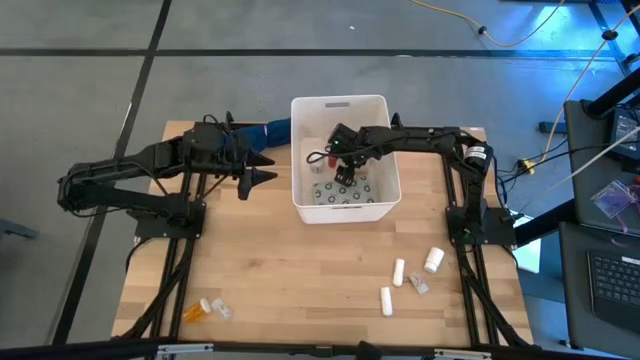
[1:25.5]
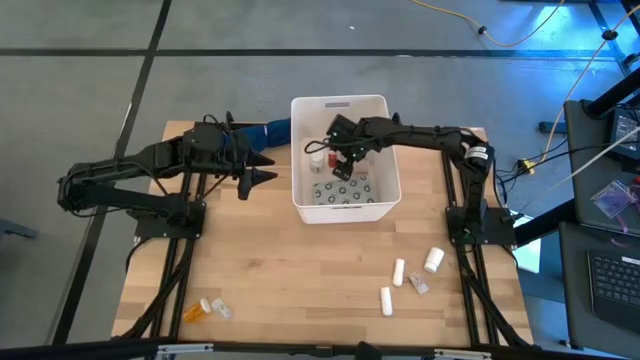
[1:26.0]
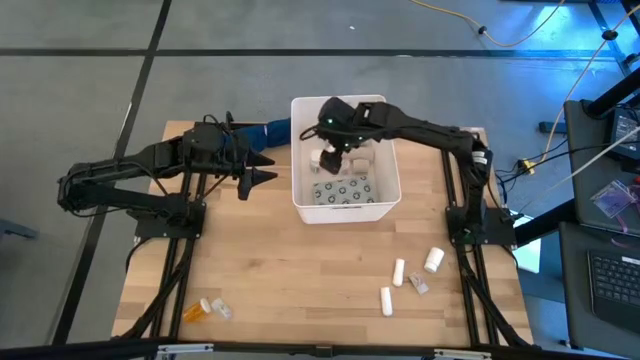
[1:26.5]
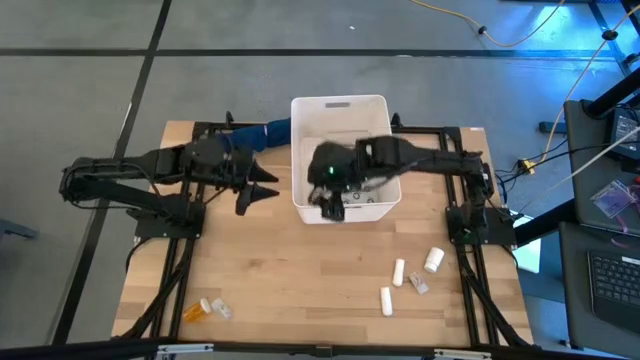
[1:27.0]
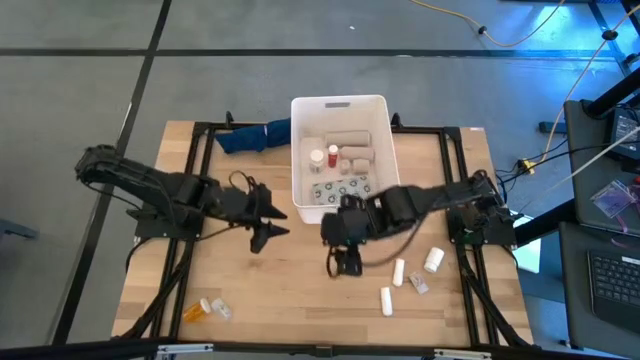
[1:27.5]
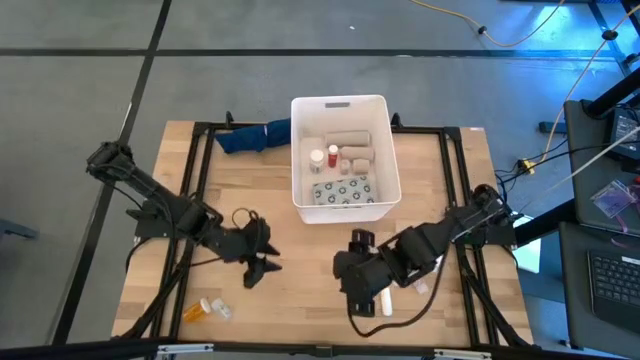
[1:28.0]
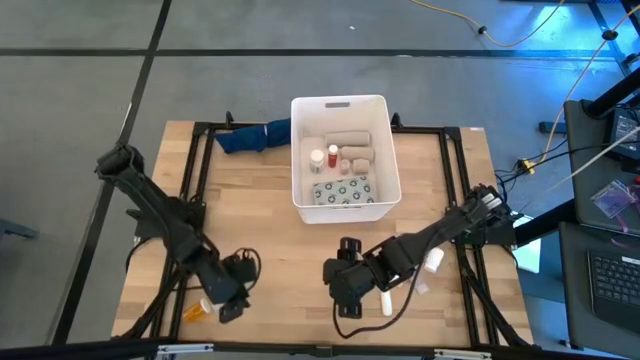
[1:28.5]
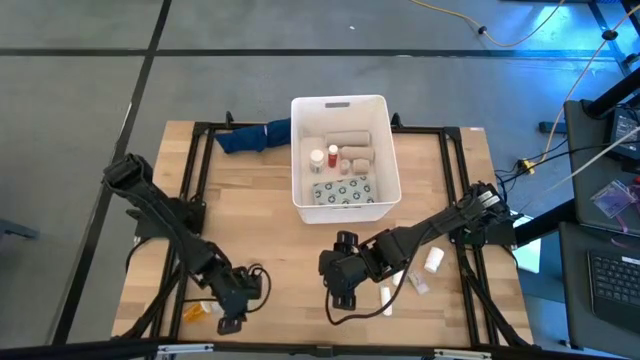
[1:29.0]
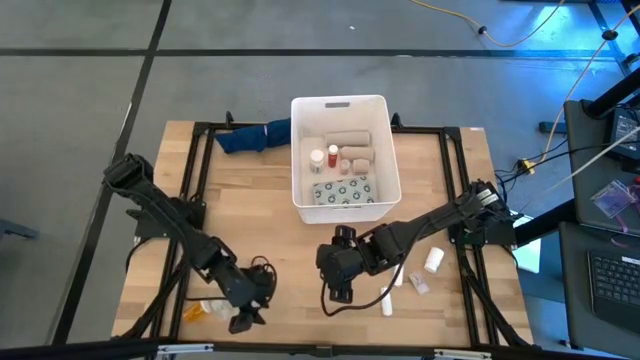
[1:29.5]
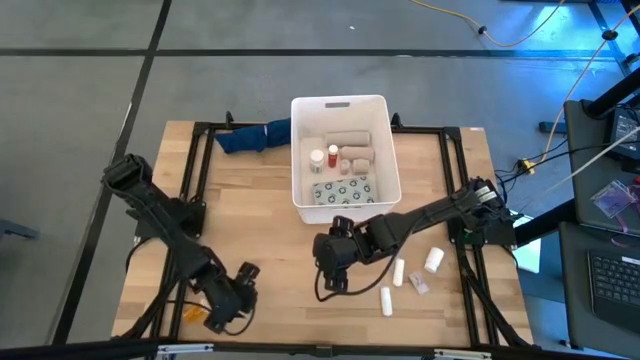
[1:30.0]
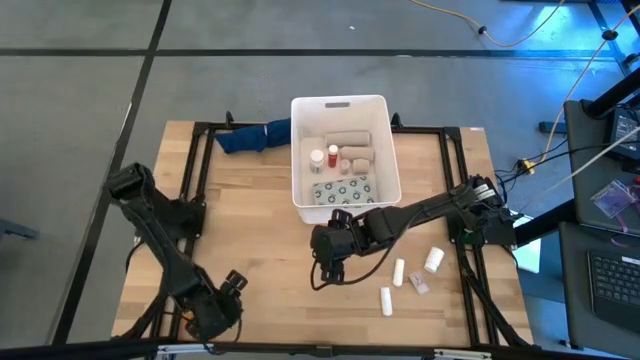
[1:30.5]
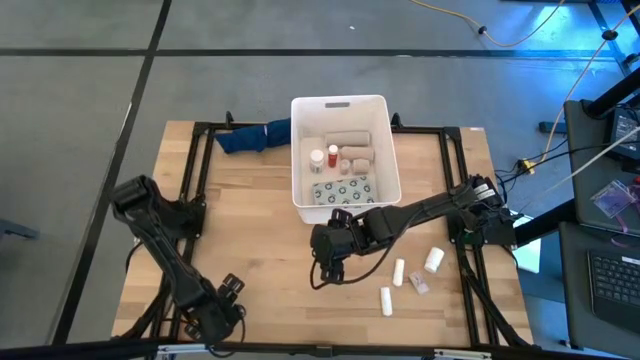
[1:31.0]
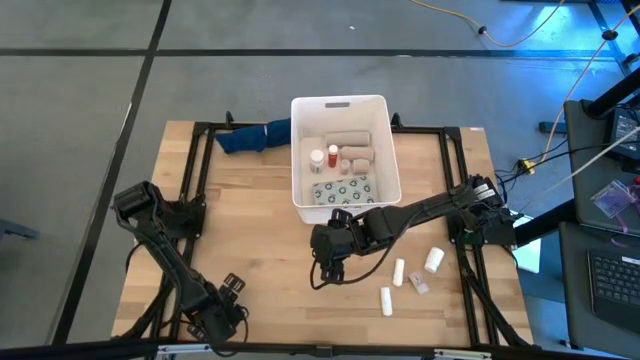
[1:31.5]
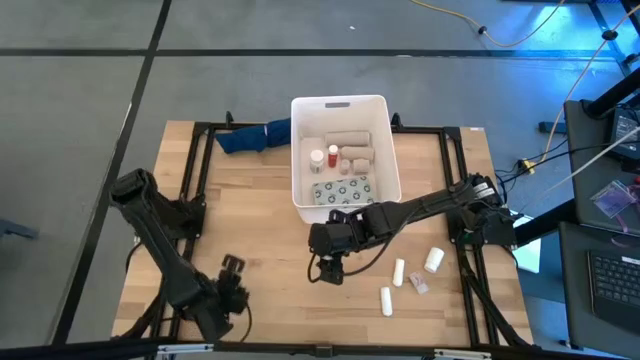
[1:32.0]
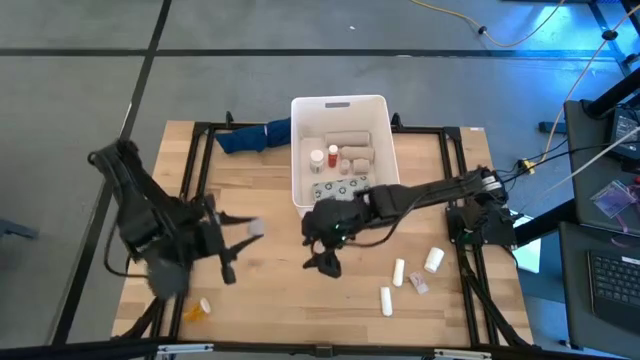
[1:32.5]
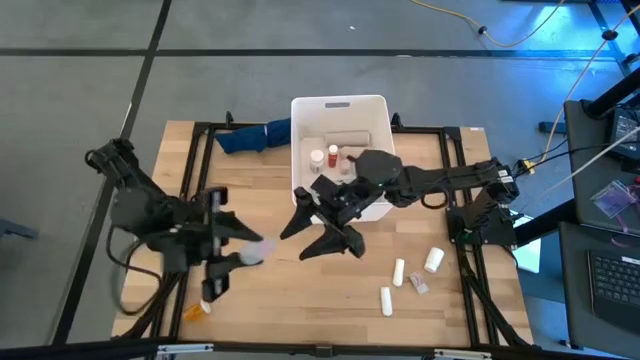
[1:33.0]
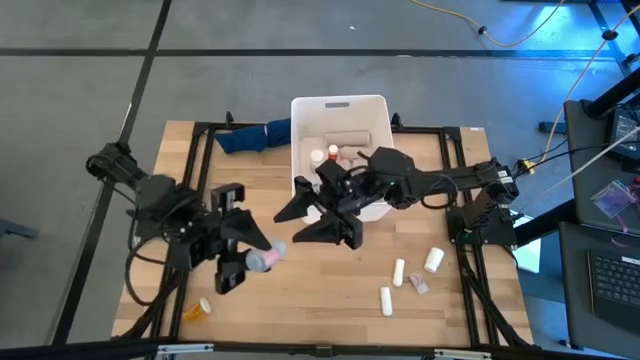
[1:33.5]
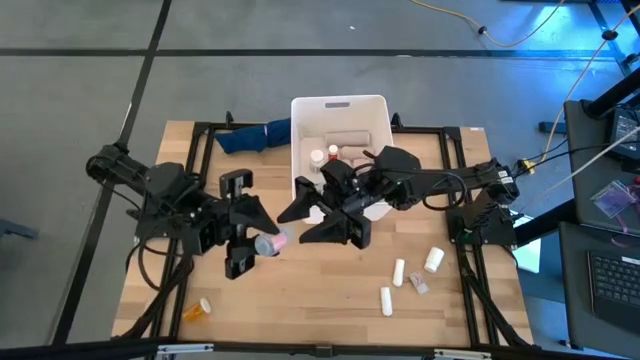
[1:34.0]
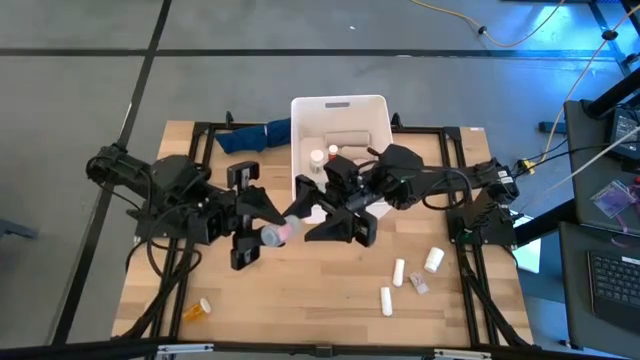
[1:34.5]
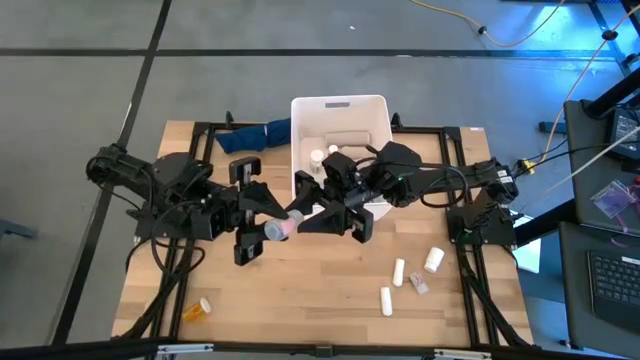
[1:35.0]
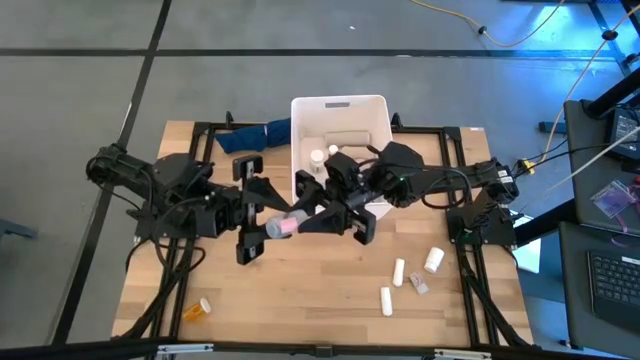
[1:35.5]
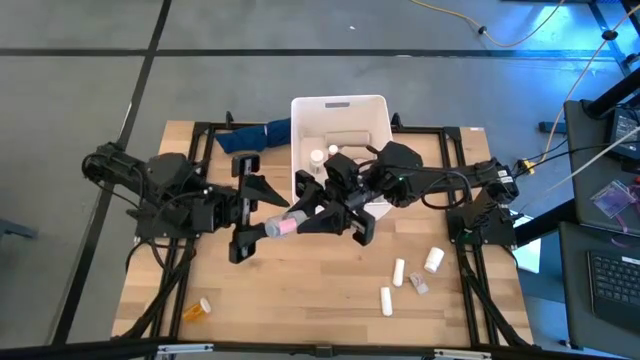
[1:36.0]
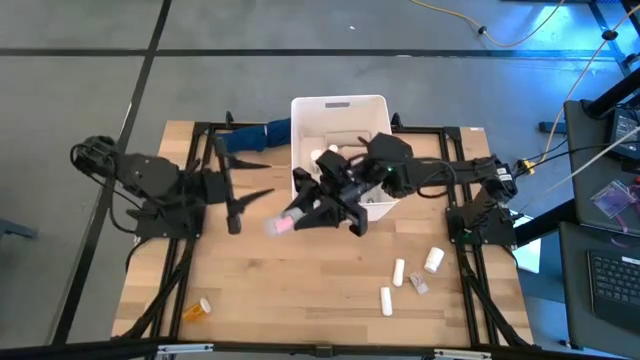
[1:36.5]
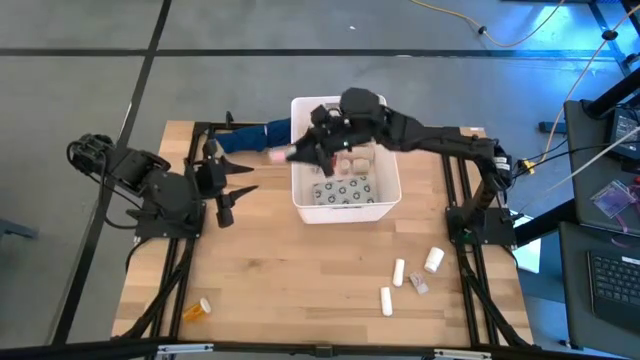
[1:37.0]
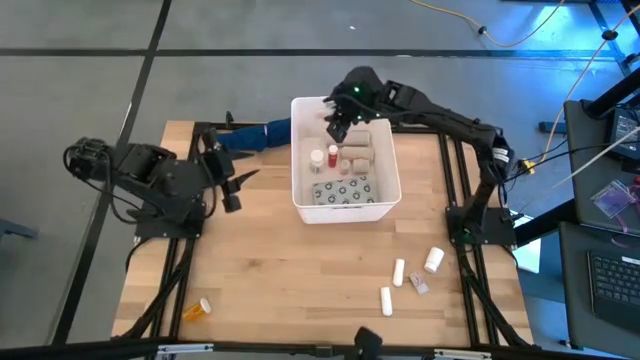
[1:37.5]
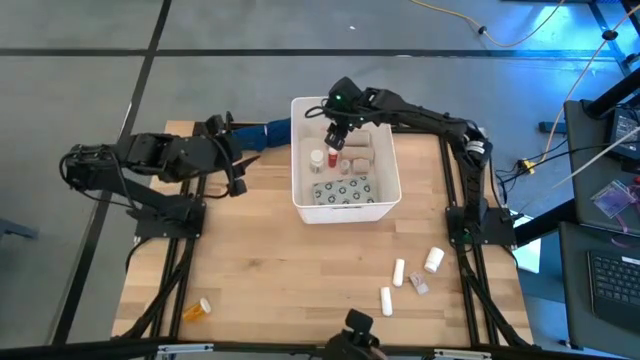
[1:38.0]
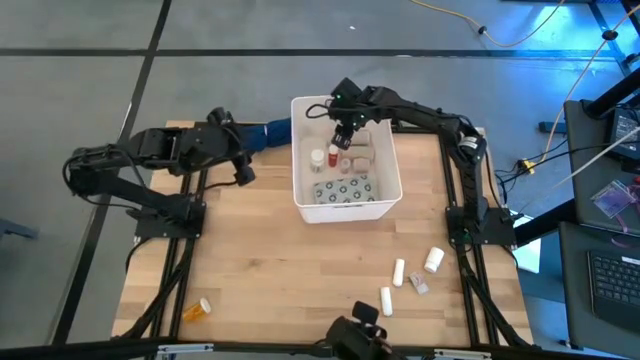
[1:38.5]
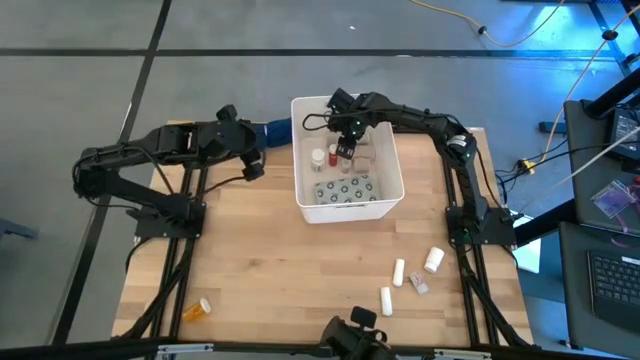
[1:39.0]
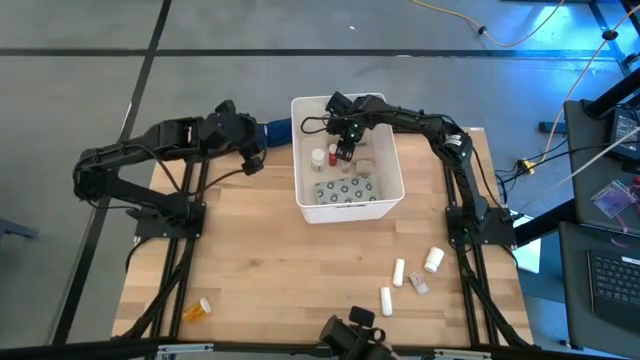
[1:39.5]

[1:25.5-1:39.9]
Task: Pick & place medical supplies in basket/bin
Put the left transparent medicine bottle into the bin

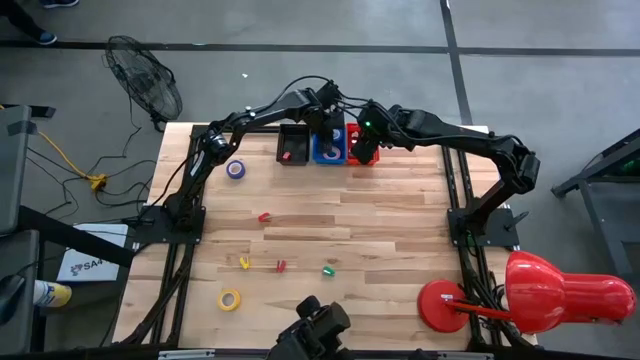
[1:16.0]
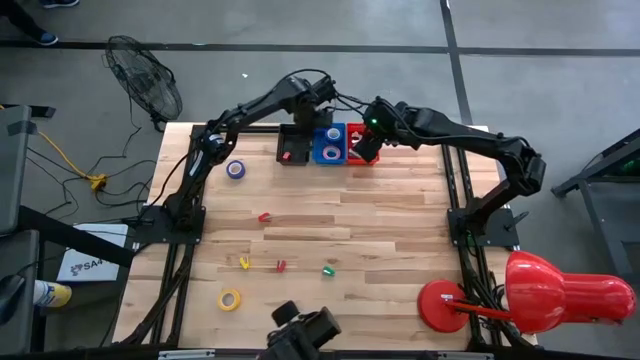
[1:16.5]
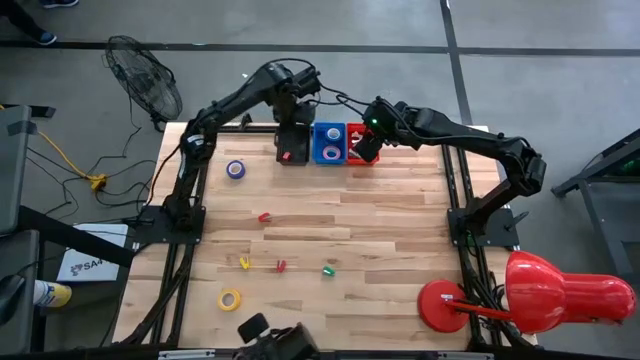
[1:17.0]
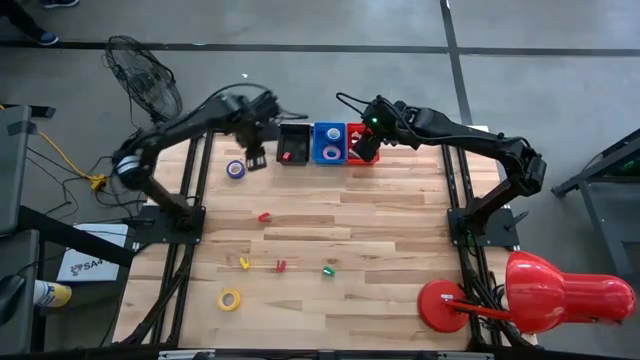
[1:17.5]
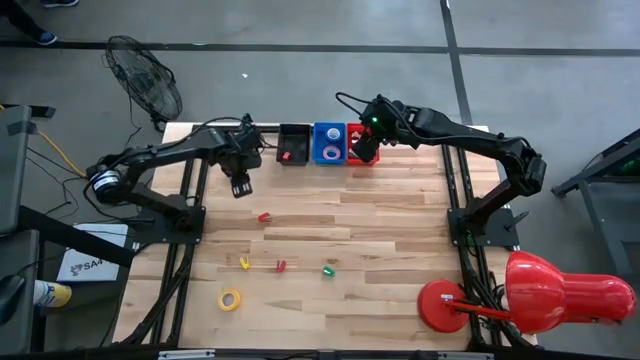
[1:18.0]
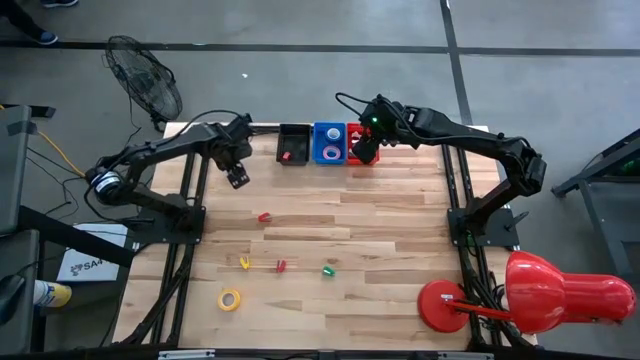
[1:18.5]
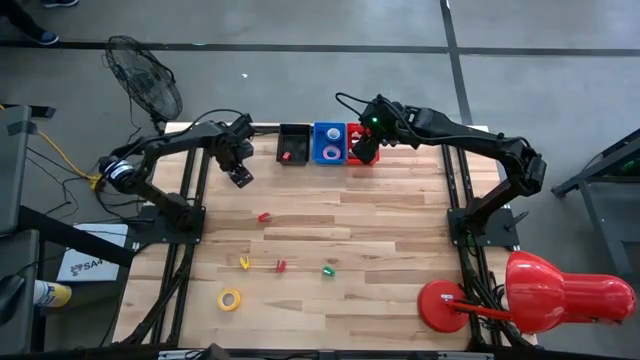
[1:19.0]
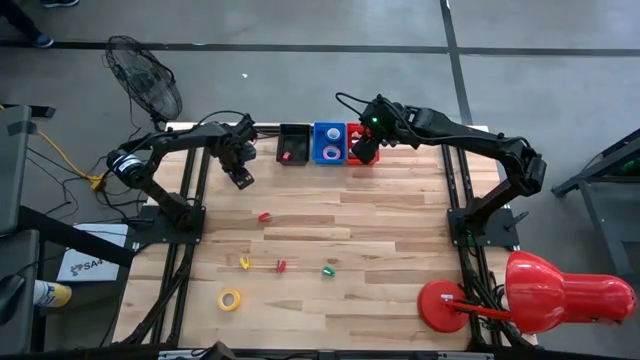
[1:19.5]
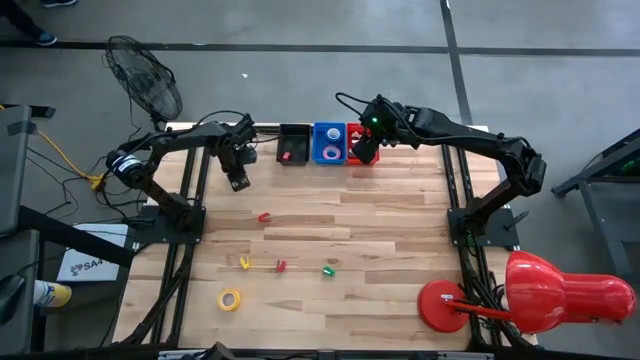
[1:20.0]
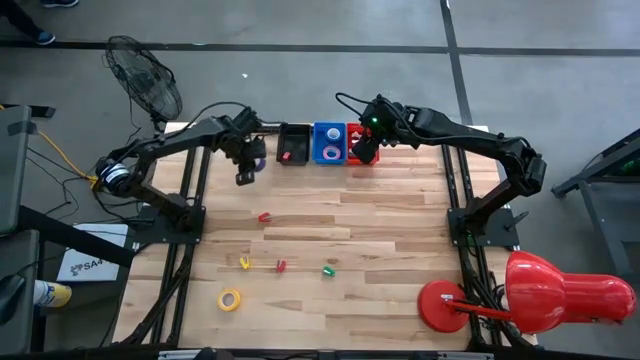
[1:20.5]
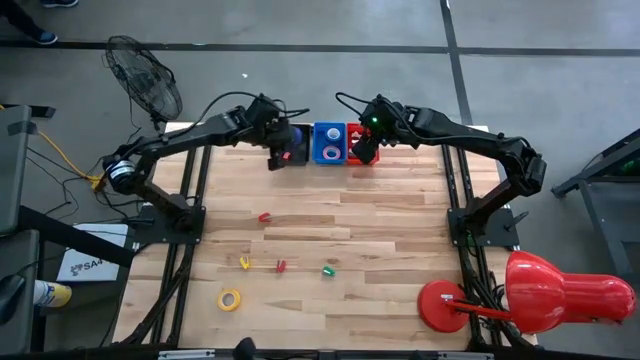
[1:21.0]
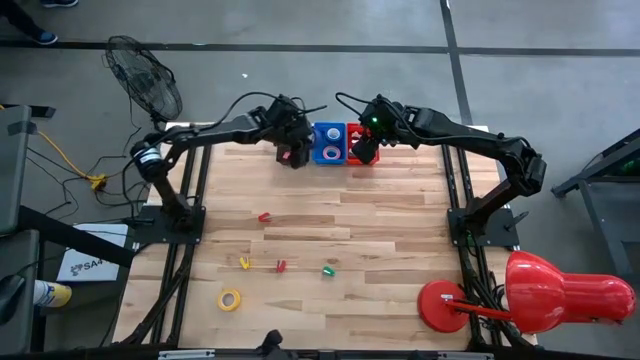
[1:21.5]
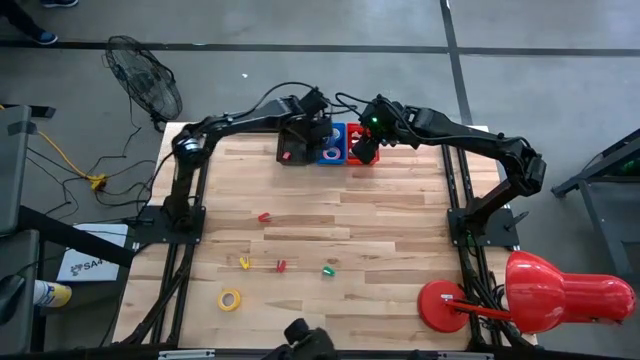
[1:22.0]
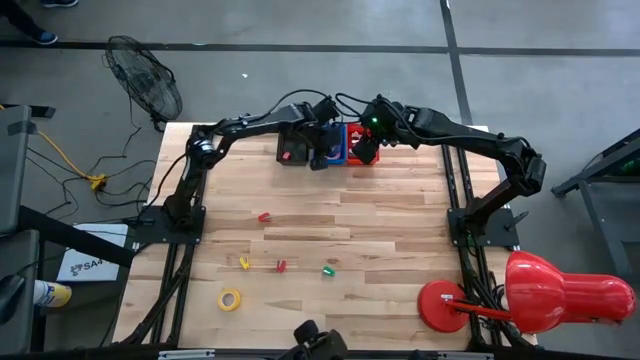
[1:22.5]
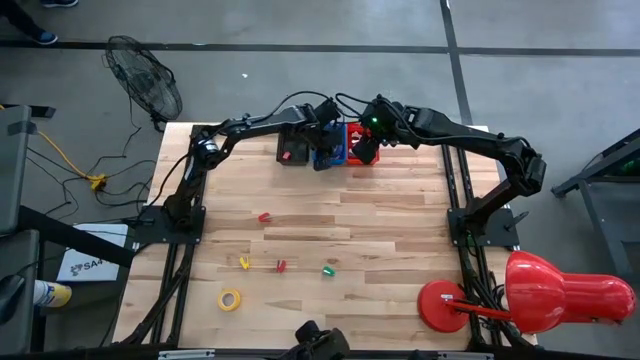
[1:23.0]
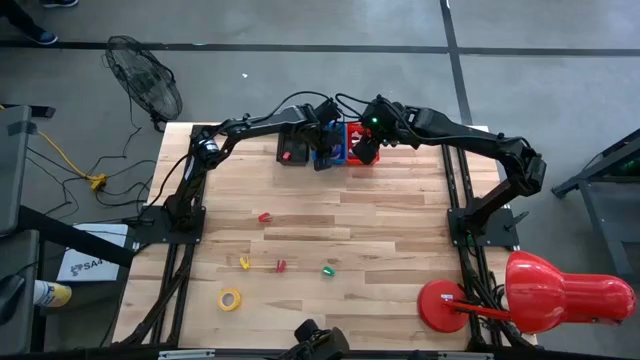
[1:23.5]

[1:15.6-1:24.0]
Task: Pick and place Stapler, Stapler remover, tape
Put the dark blue tape into the blue bin
